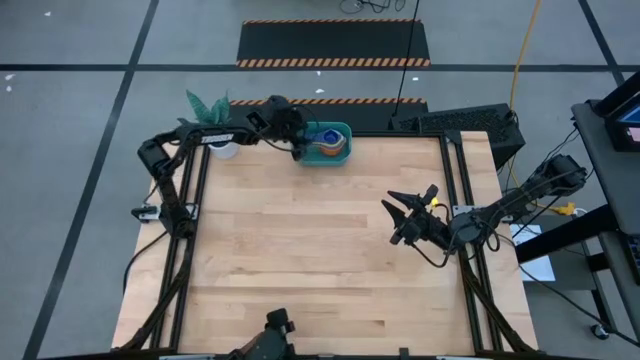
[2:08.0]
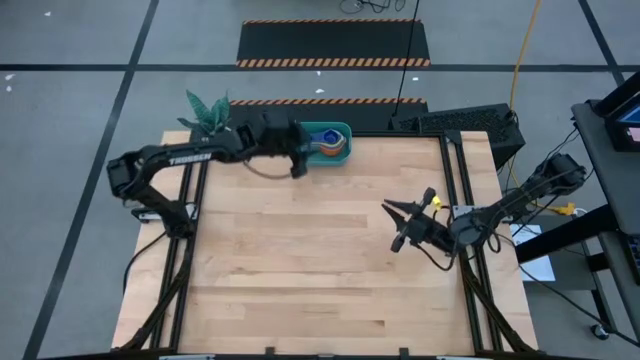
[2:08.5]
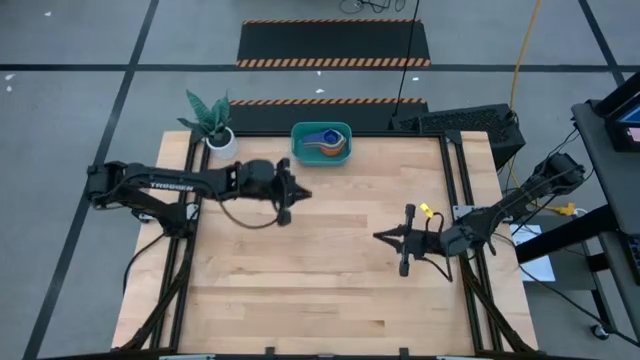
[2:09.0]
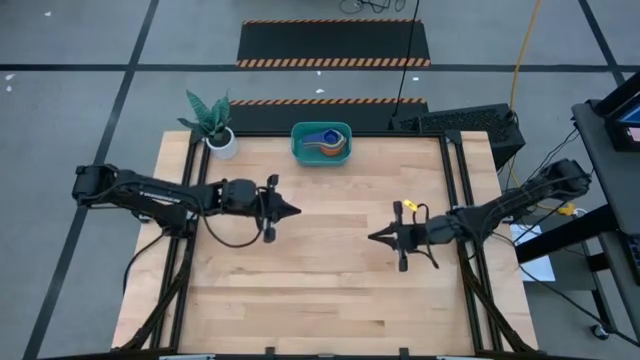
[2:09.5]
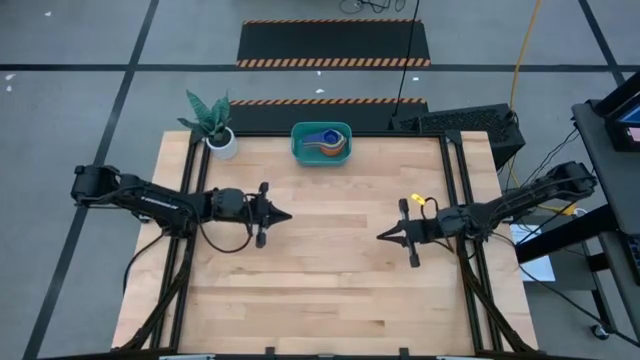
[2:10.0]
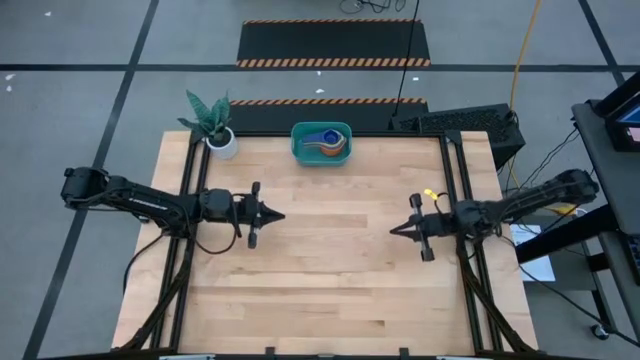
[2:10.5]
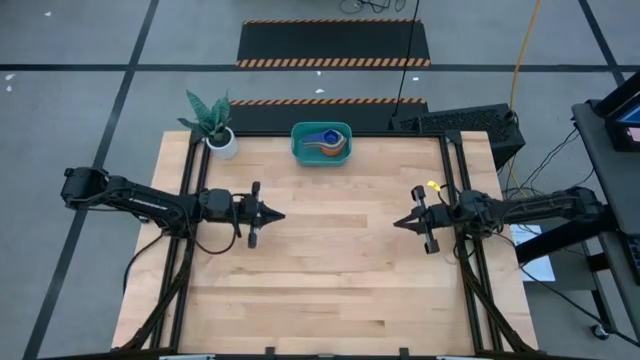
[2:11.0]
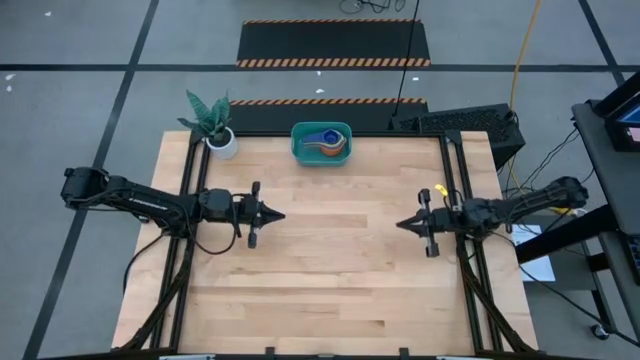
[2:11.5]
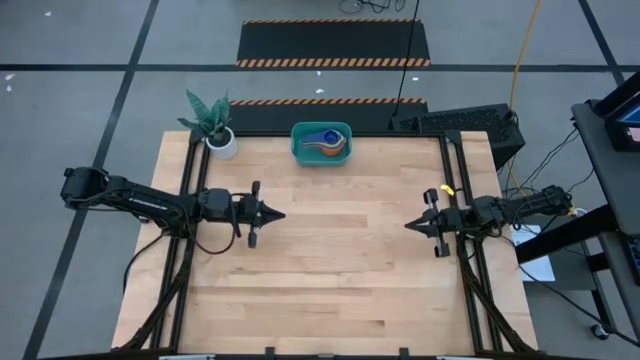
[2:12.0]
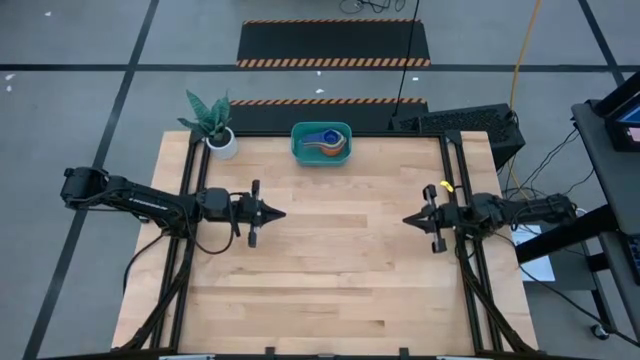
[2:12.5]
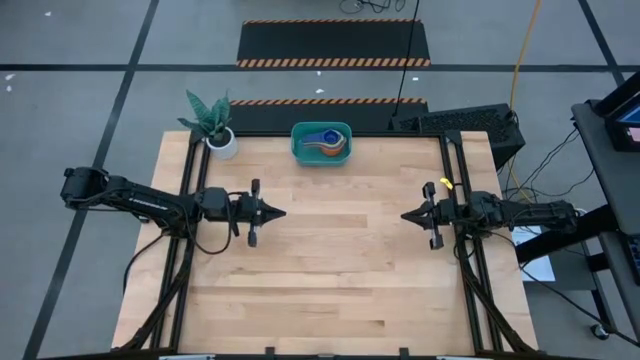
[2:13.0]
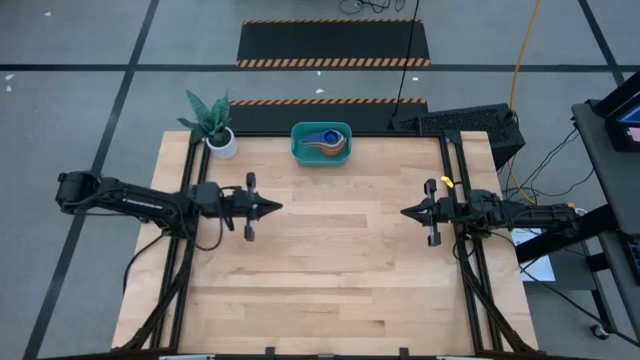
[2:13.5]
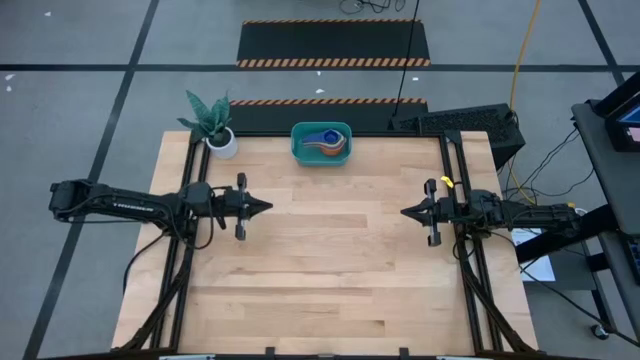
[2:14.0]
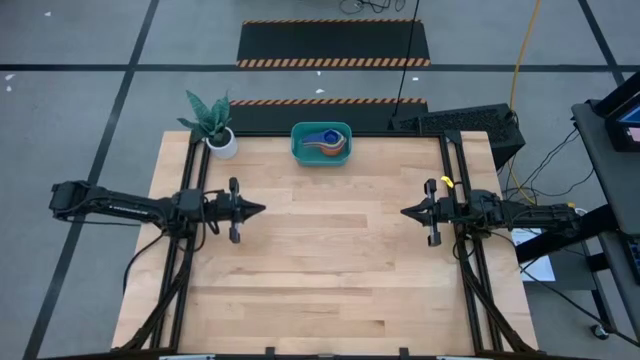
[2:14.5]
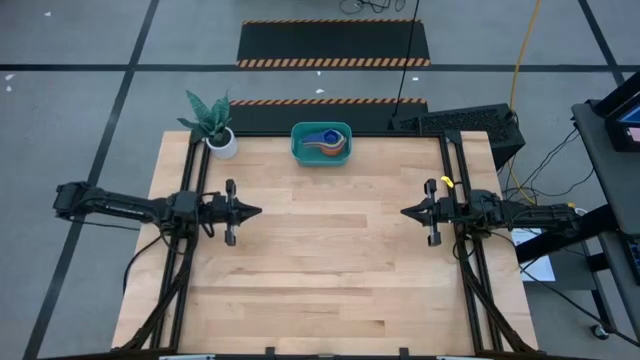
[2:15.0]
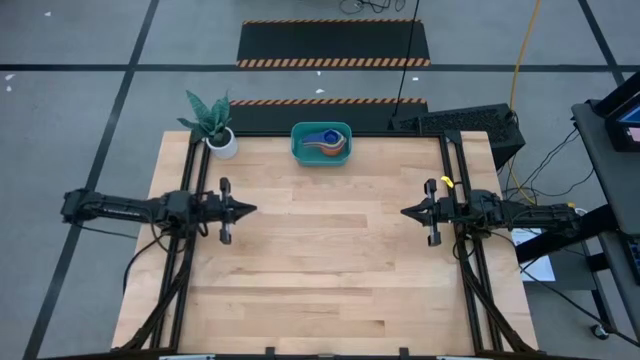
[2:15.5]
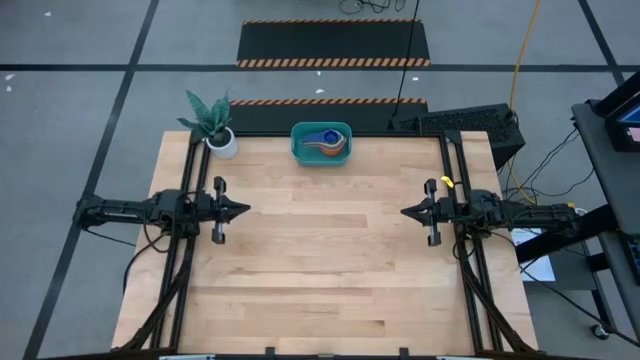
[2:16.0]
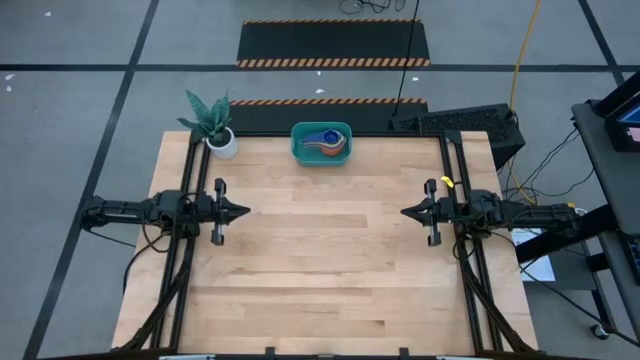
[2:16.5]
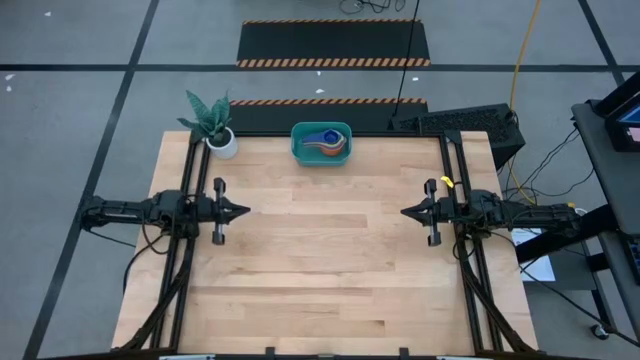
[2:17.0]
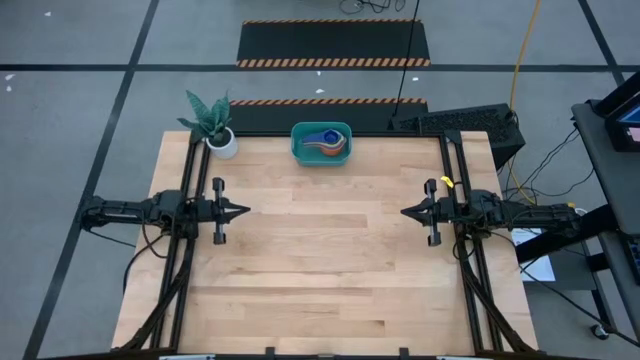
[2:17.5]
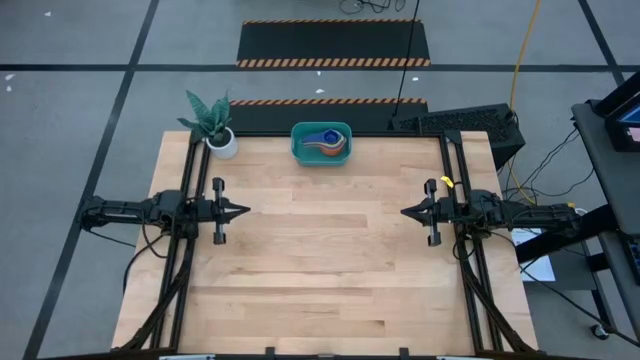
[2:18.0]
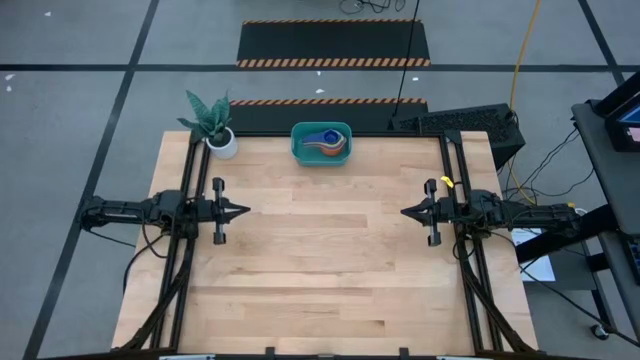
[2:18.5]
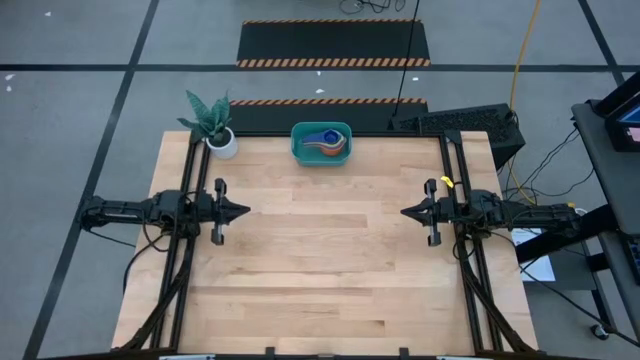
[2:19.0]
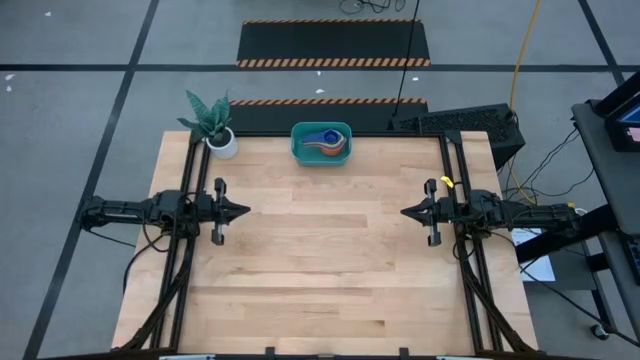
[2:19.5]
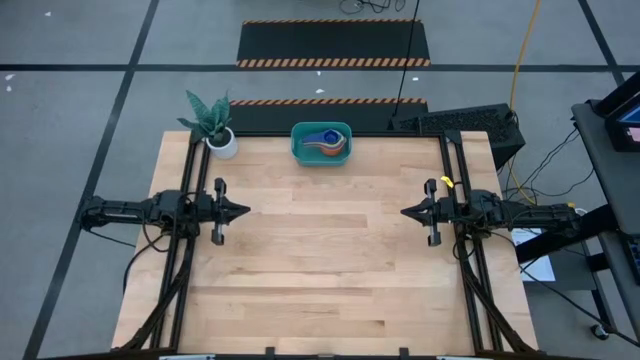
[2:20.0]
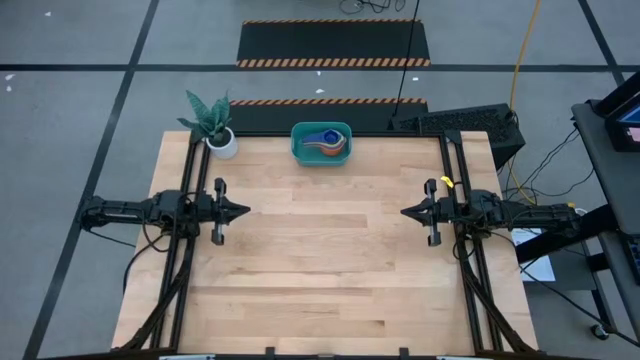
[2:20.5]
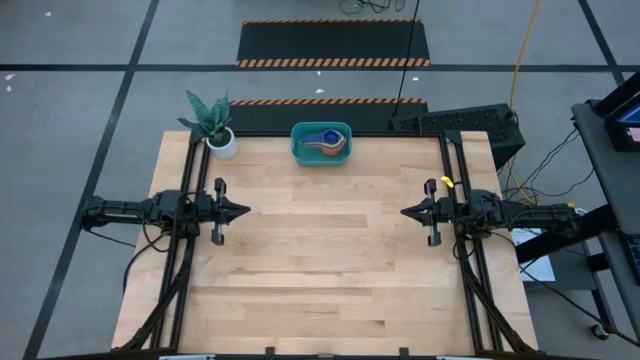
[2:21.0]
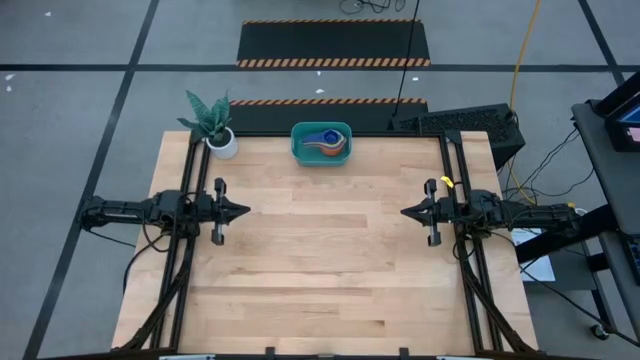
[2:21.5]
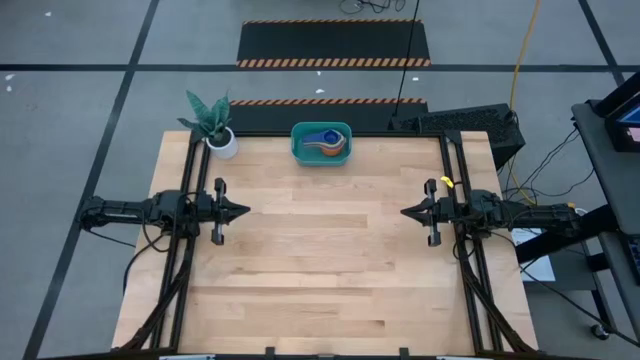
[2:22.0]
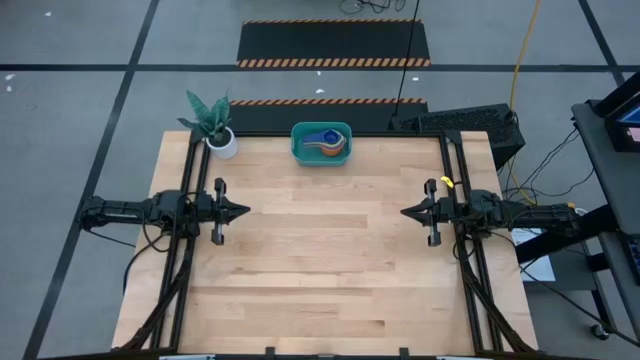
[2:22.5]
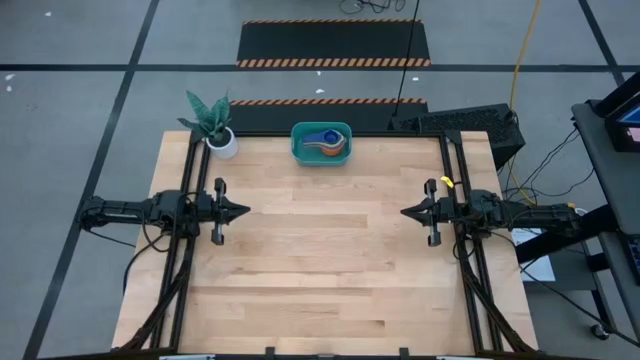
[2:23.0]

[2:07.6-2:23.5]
Task: Nest measuring cups in basket
Return to Home Position

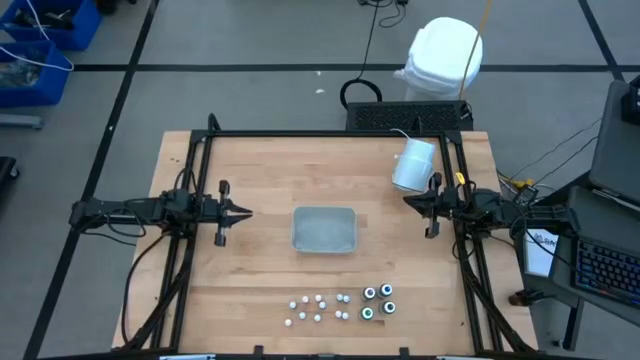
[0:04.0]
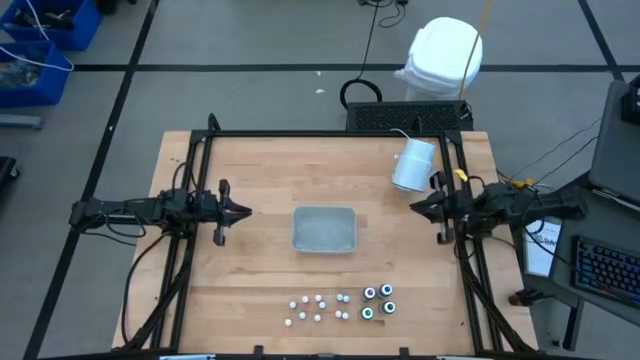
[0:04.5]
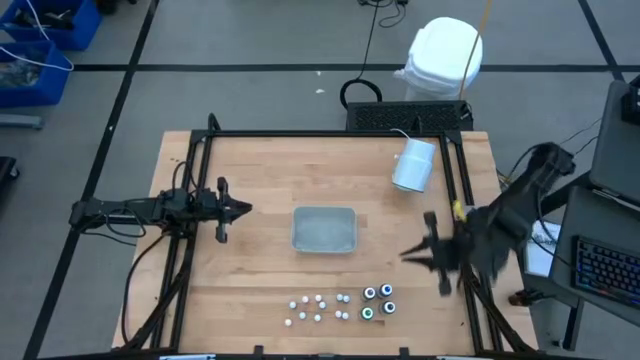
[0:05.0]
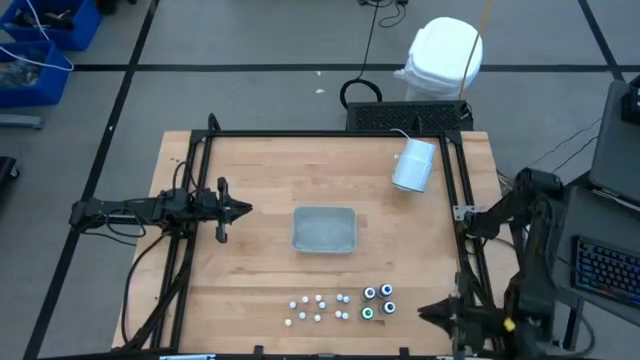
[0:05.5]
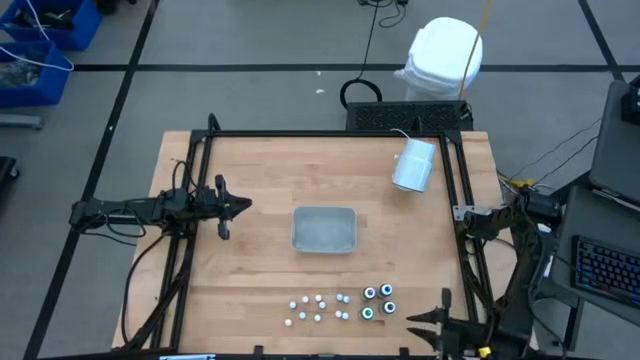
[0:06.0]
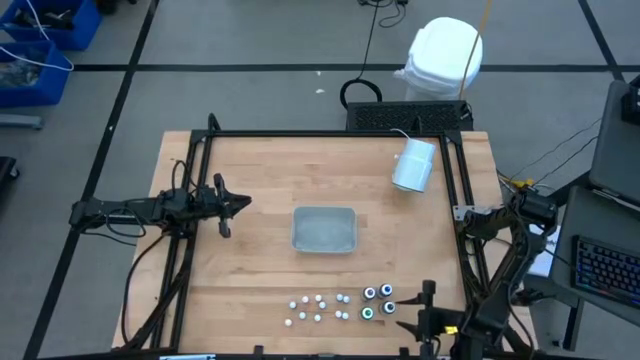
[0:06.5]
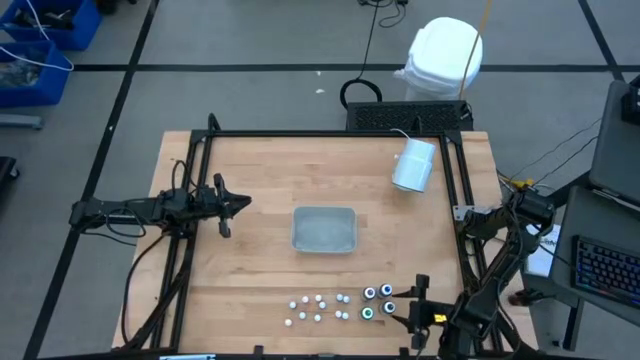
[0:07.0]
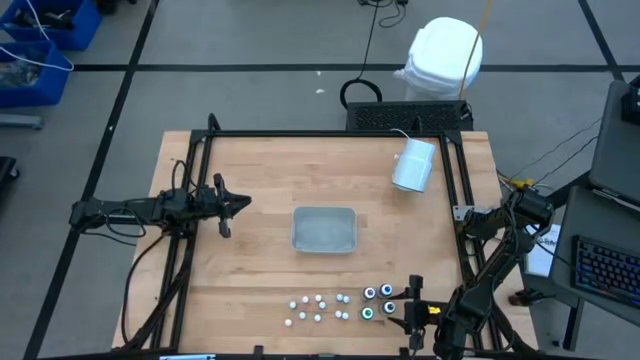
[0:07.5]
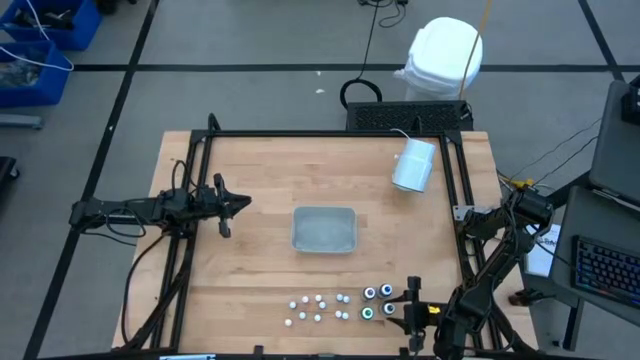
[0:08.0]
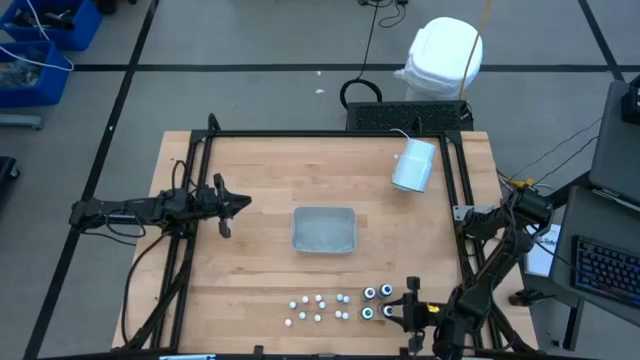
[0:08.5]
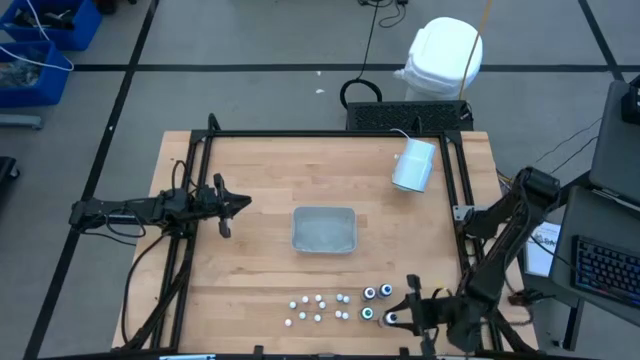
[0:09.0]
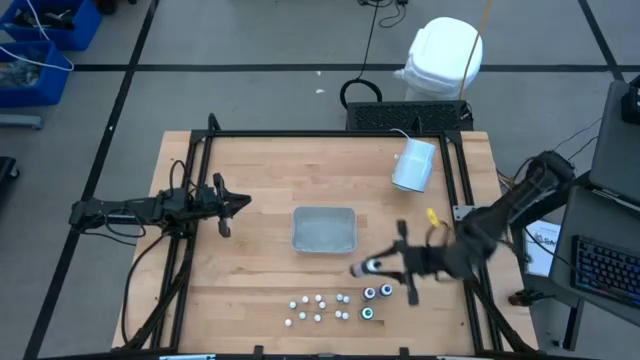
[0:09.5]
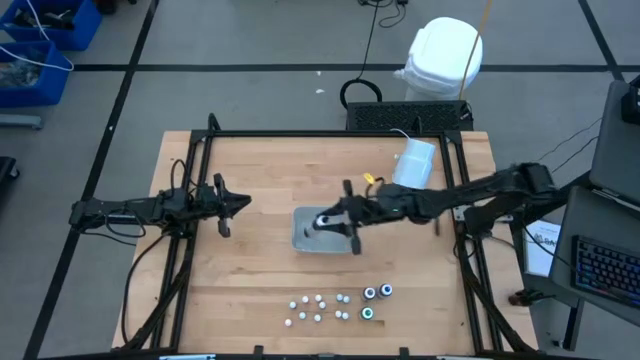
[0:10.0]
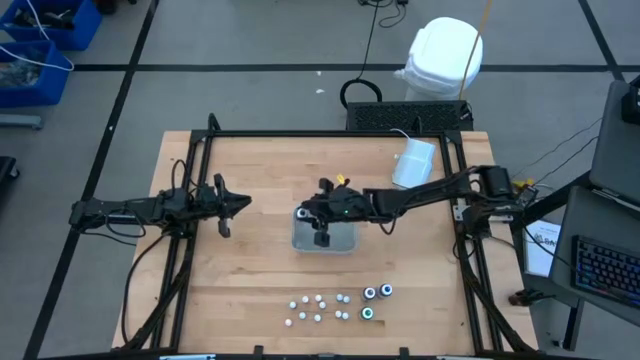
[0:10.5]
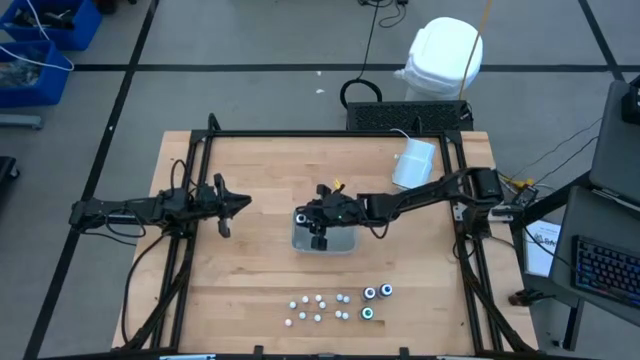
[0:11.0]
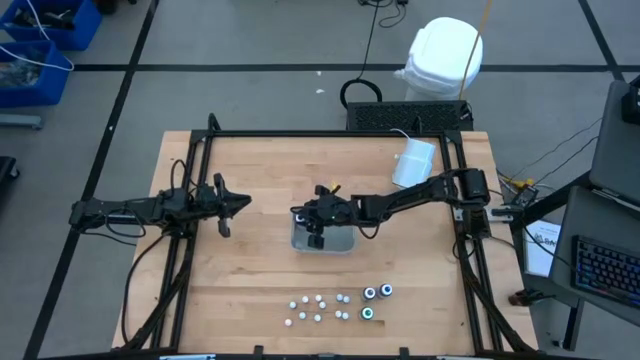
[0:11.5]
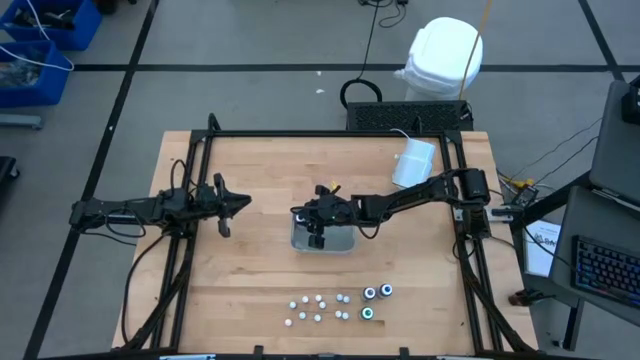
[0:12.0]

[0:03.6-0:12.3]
Task: Pick & Place food coloring
Put the big black bottle into the gray bin
